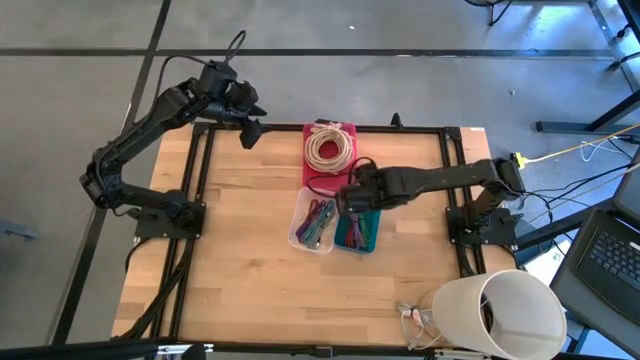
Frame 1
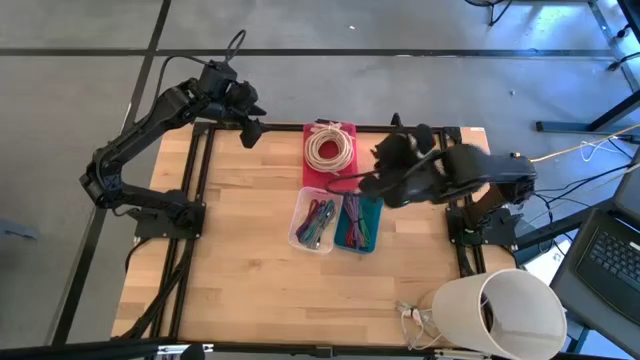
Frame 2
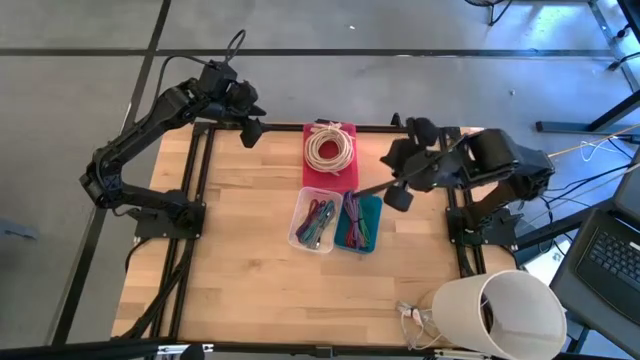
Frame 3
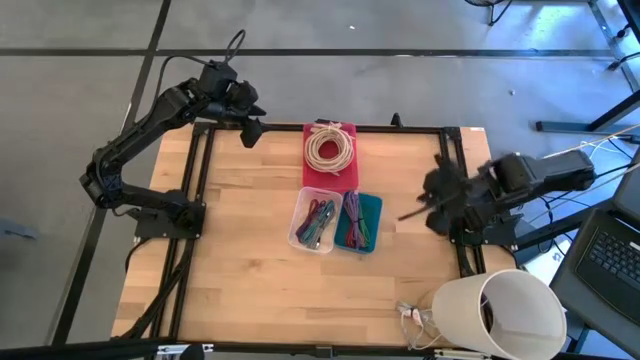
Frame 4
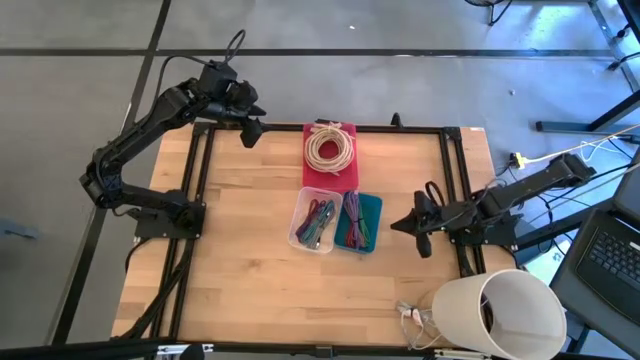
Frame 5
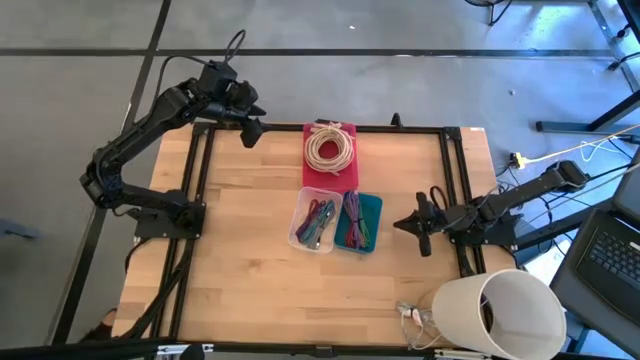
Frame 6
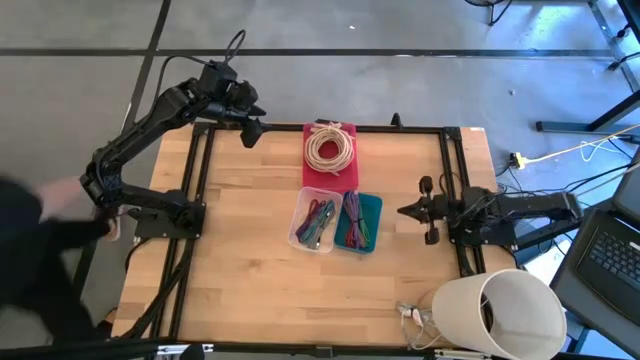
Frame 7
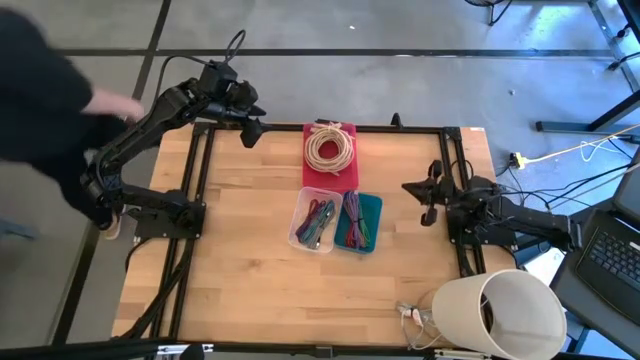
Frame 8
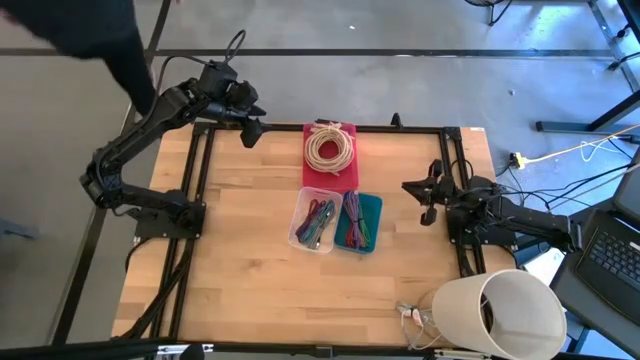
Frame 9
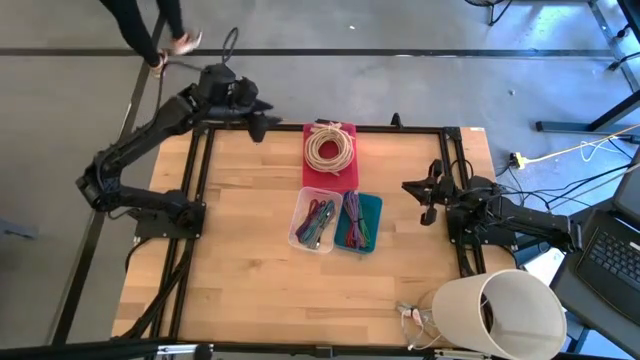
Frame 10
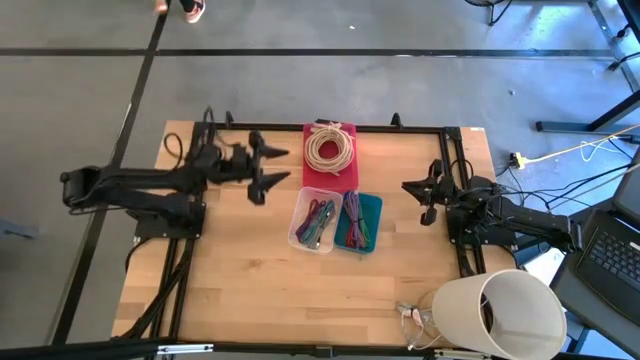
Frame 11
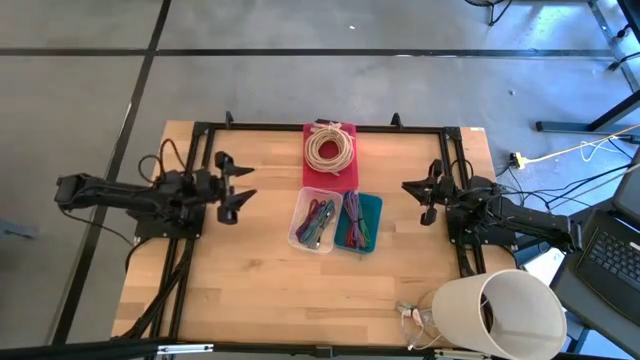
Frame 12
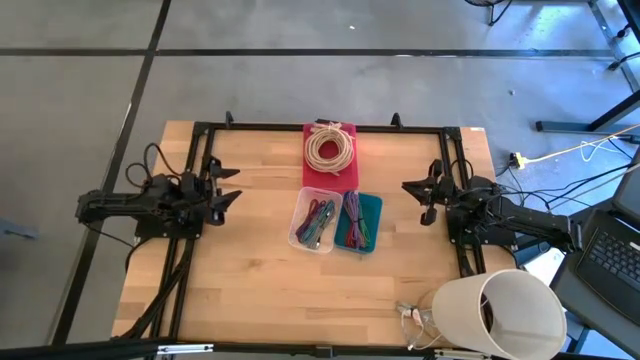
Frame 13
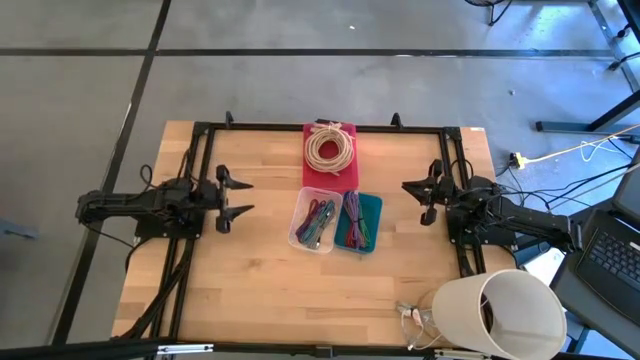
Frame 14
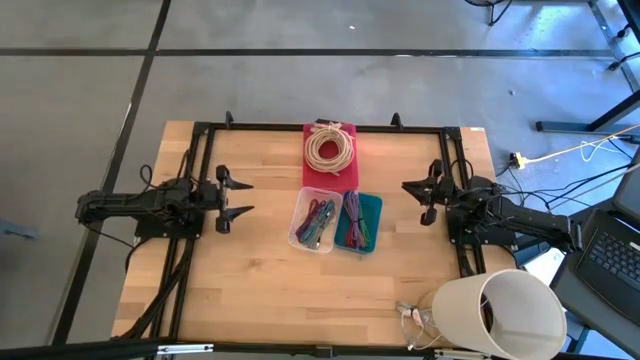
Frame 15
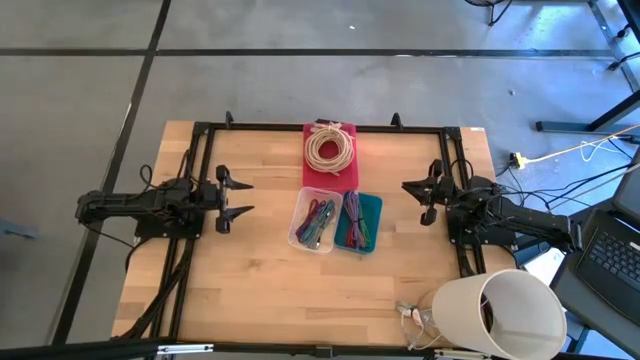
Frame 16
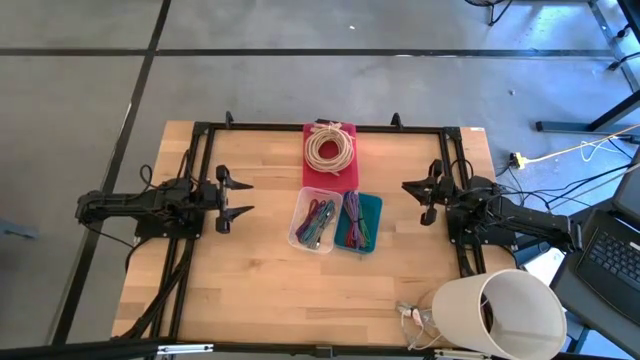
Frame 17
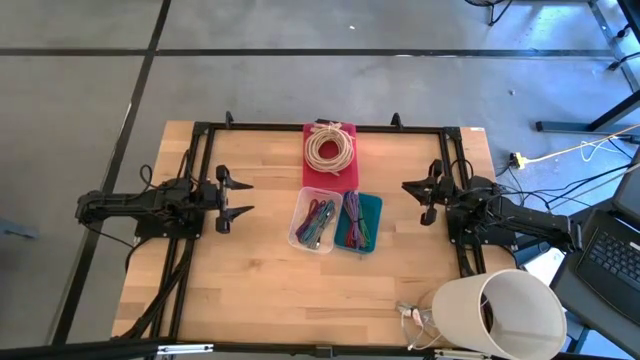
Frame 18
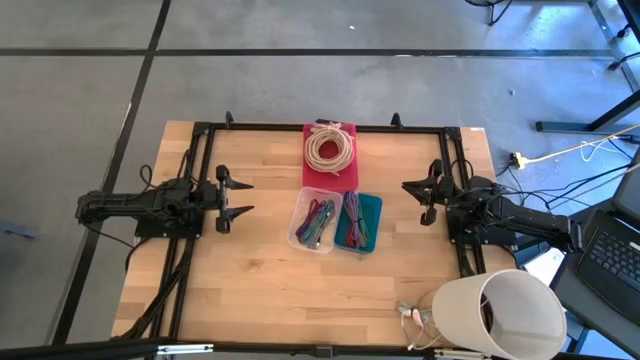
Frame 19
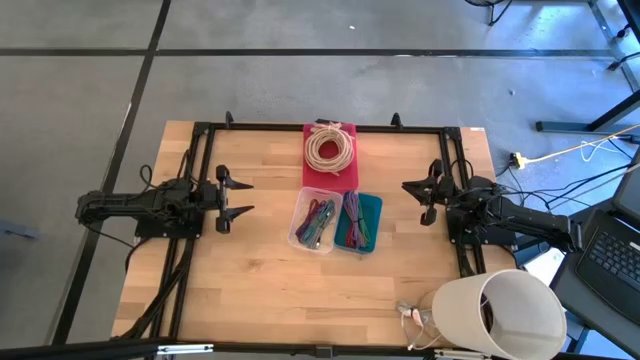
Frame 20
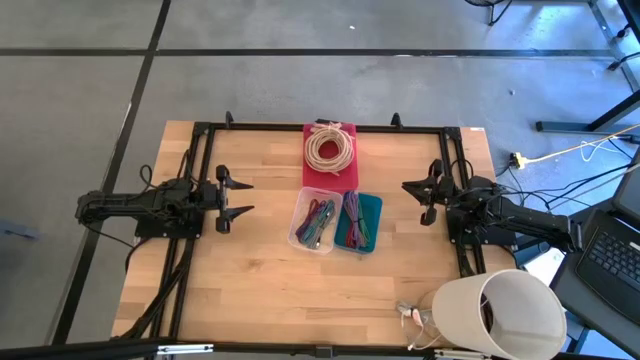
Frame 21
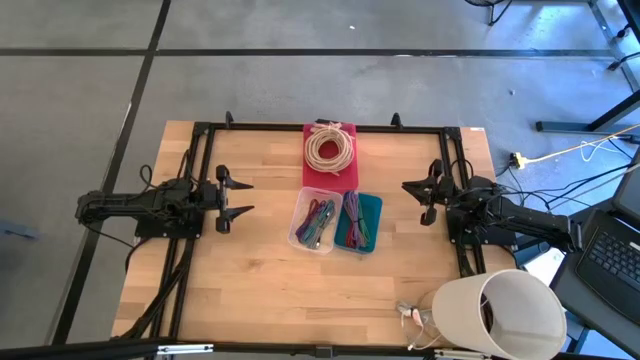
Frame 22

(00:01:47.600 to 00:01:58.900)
Task: Pick & Place USB Port
Return to Home Position

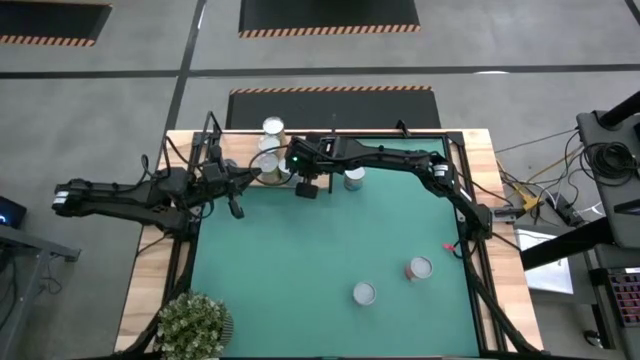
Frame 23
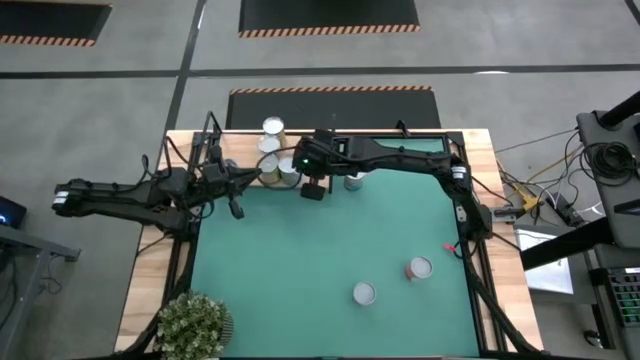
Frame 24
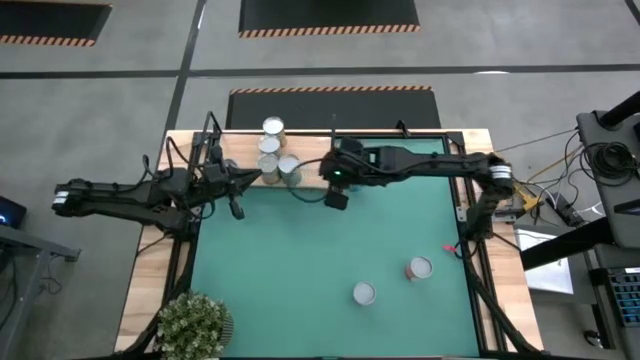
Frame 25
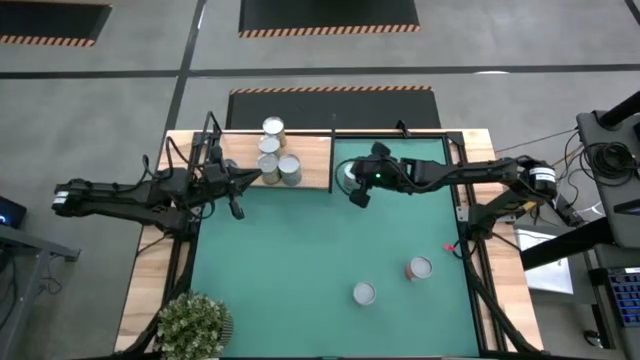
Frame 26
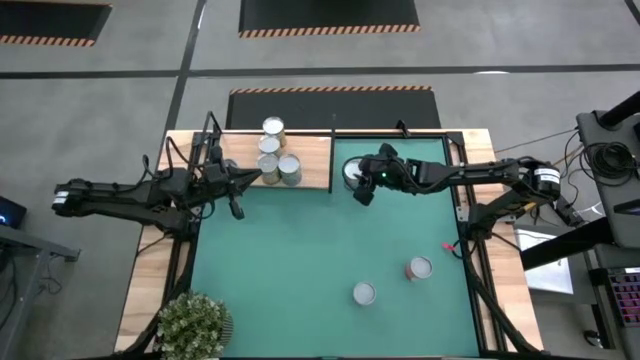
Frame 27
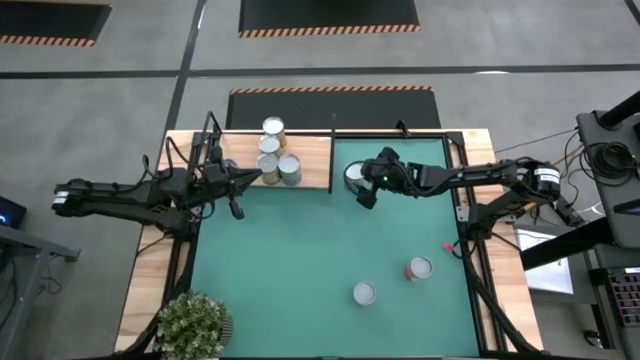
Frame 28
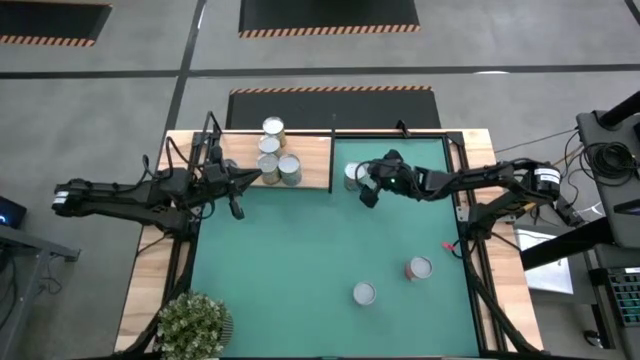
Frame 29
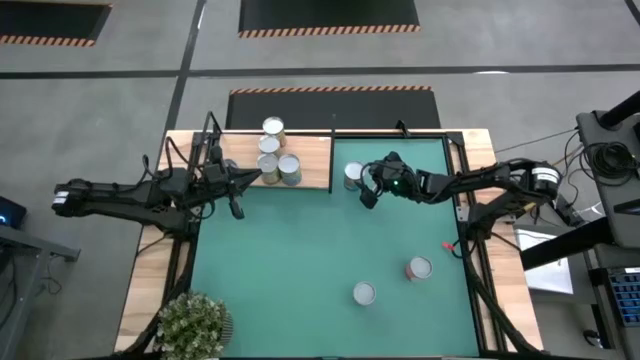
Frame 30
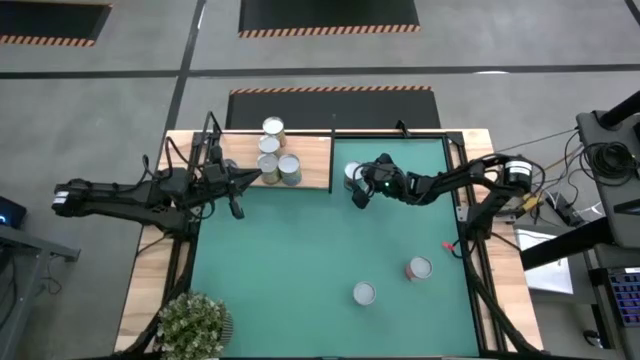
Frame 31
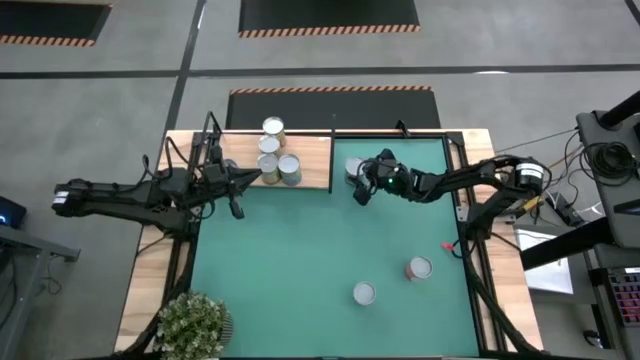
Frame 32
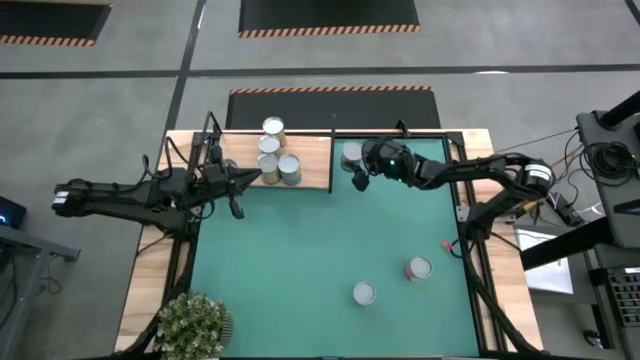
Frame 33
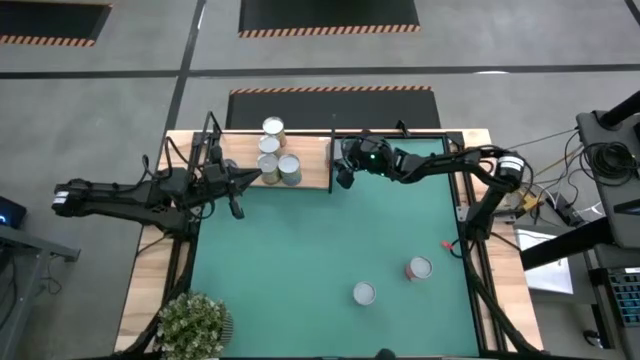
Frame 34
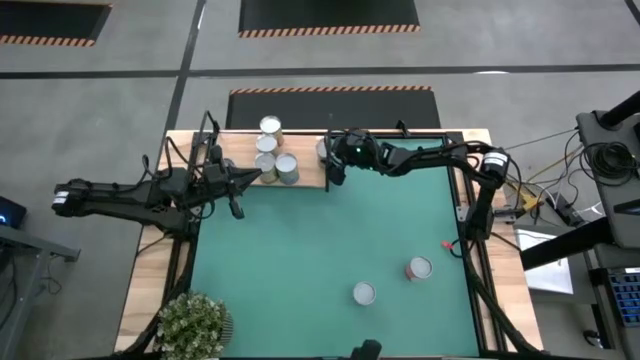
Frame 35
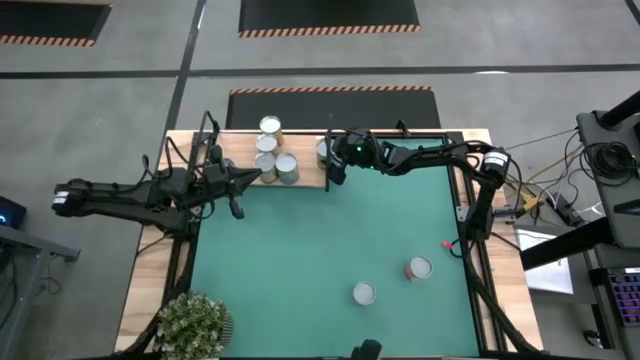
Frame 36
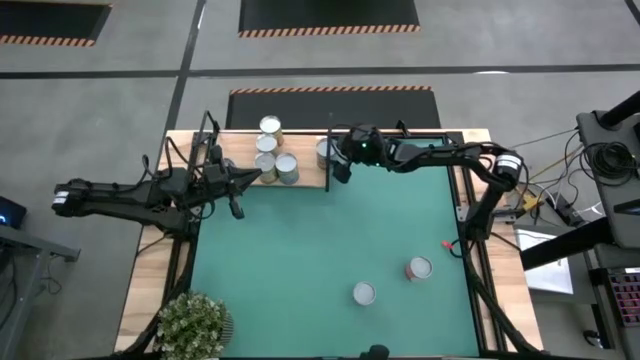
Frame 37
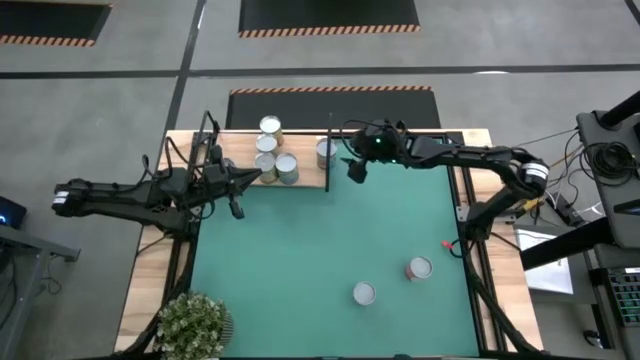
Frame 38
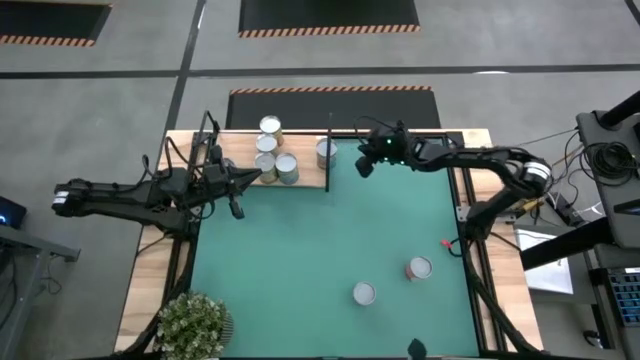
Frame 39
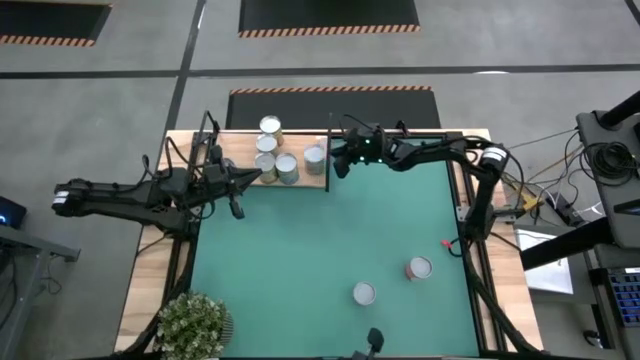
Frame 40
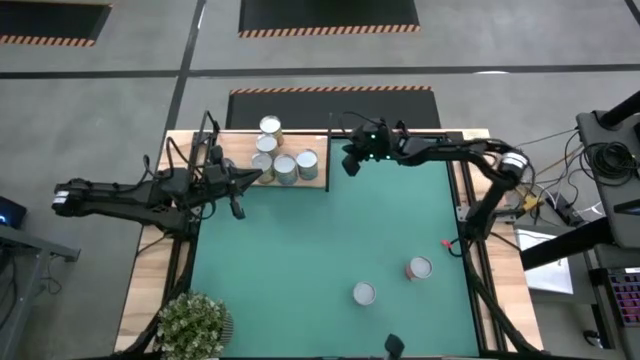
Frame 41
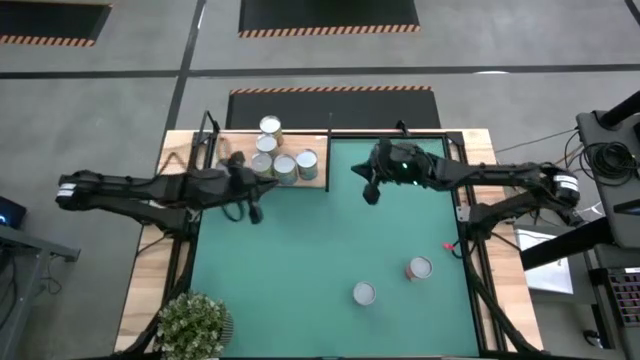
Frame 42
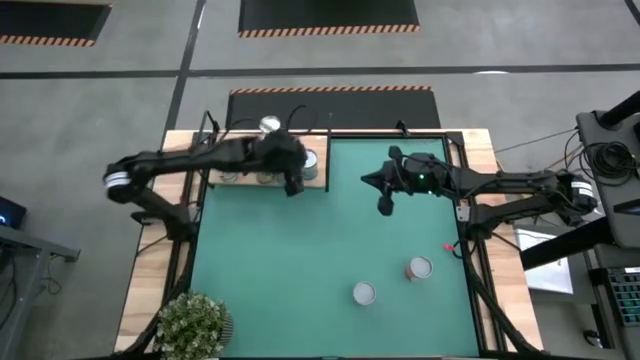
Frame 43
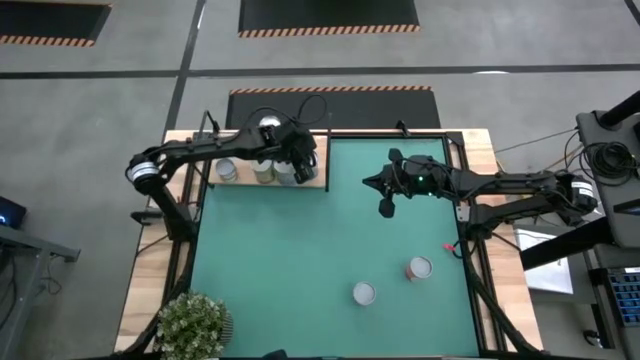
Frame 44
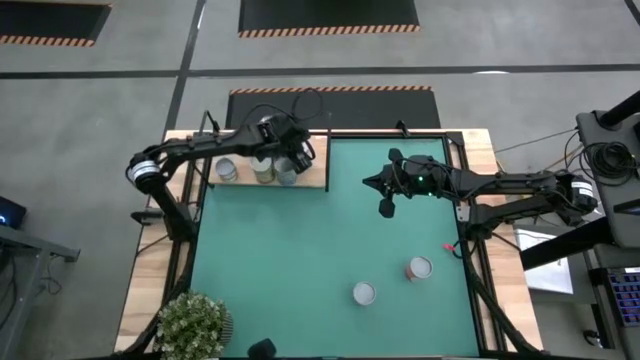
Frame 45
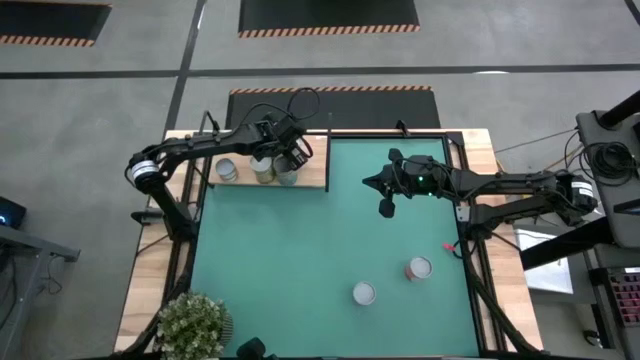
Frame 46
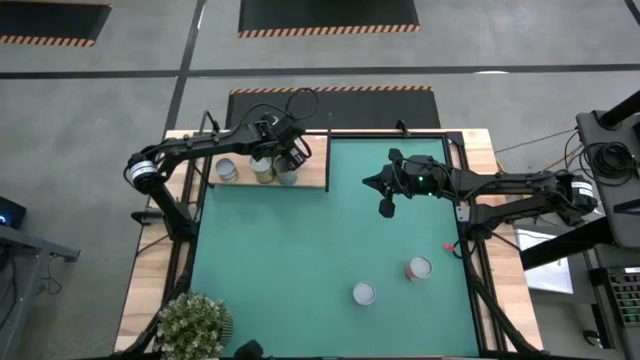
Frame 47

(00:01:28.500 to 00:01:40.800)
Task: Pick and place cans onto a shelf
Put the canned tomatoes on the shelf
